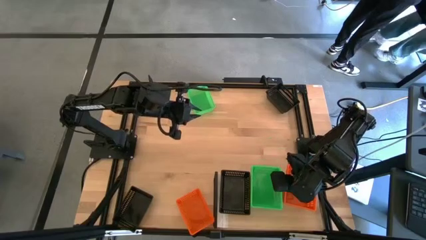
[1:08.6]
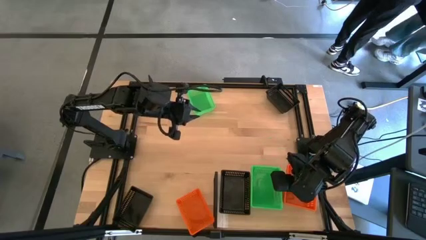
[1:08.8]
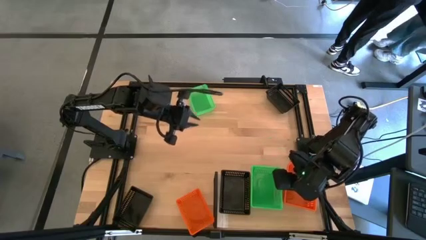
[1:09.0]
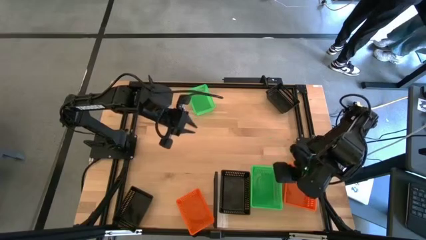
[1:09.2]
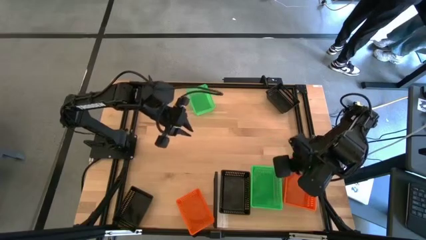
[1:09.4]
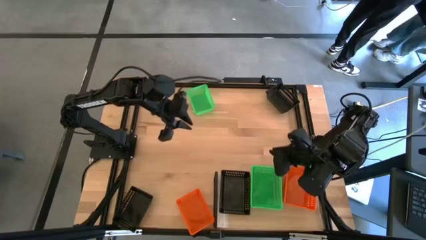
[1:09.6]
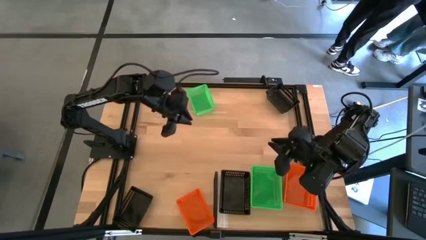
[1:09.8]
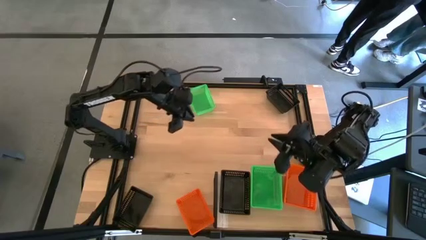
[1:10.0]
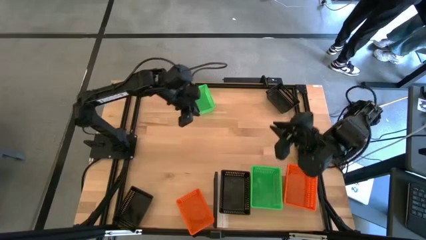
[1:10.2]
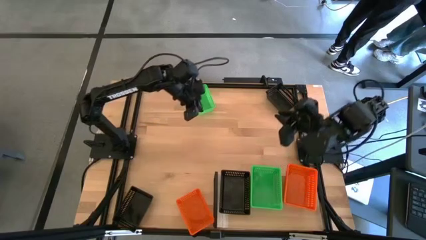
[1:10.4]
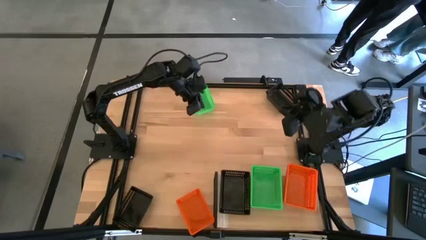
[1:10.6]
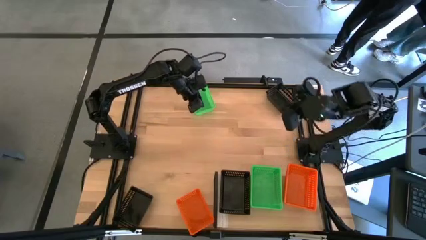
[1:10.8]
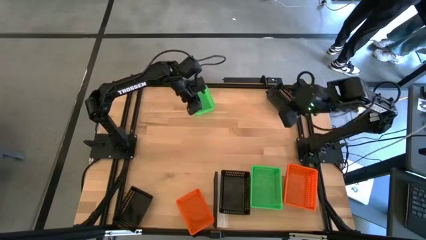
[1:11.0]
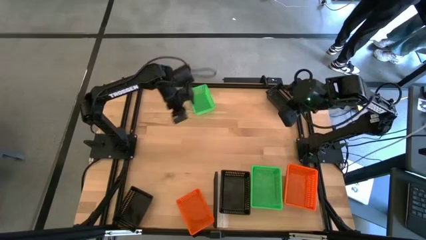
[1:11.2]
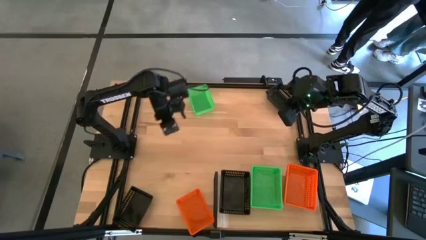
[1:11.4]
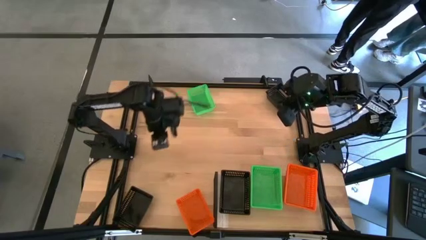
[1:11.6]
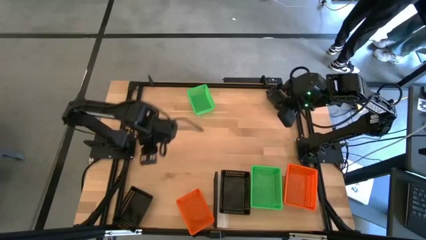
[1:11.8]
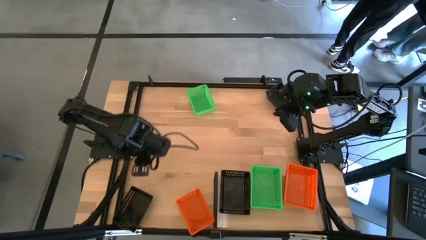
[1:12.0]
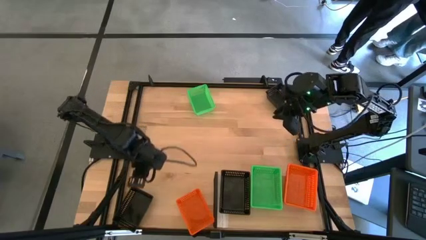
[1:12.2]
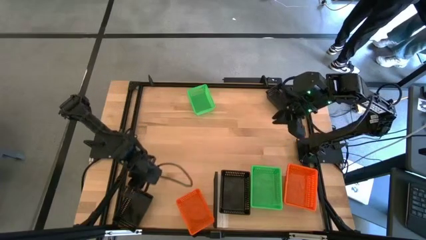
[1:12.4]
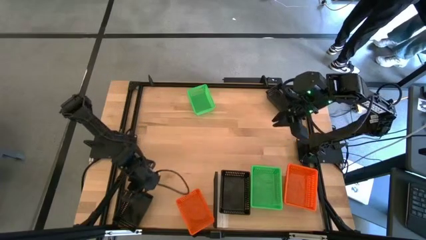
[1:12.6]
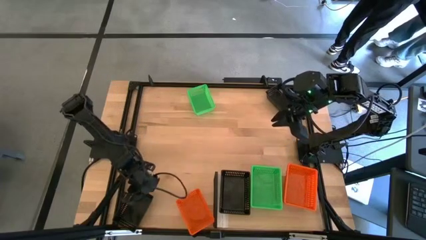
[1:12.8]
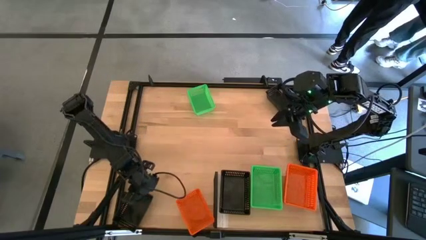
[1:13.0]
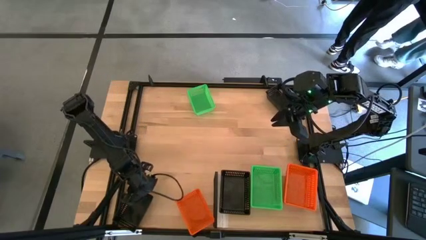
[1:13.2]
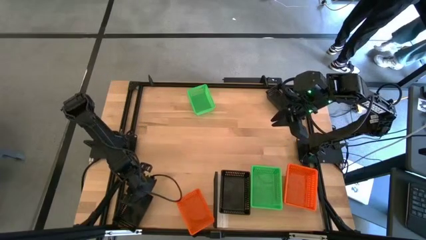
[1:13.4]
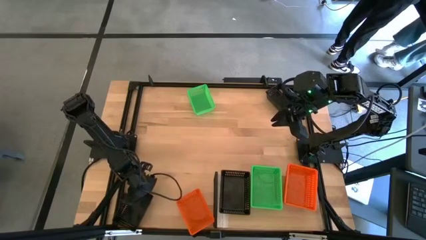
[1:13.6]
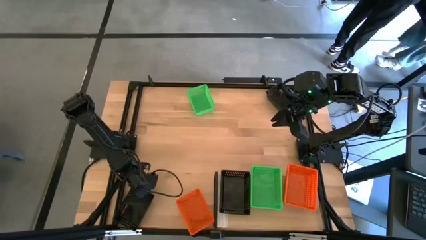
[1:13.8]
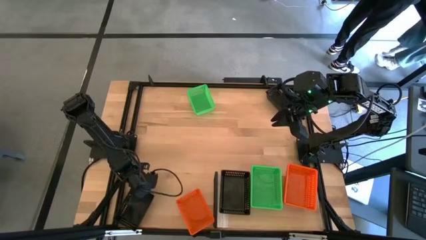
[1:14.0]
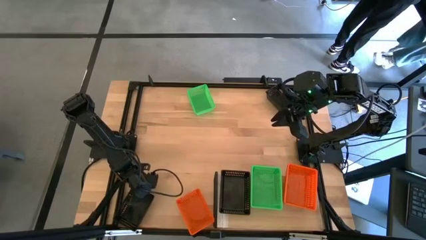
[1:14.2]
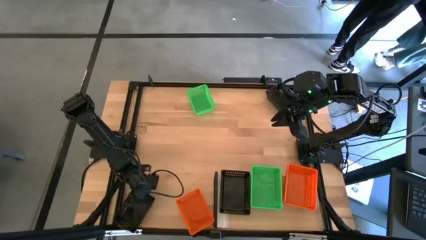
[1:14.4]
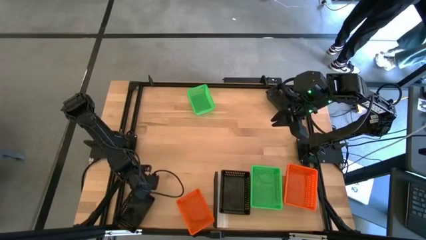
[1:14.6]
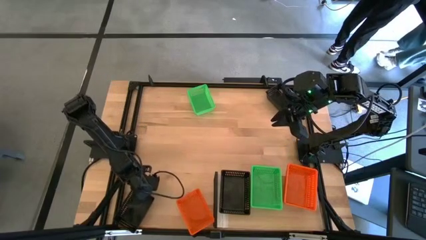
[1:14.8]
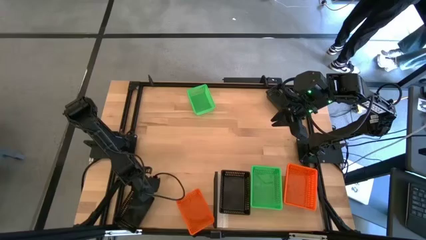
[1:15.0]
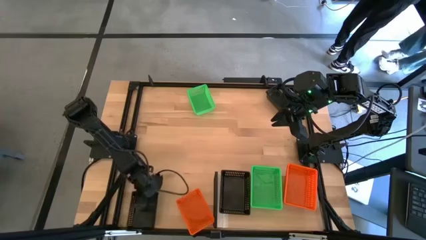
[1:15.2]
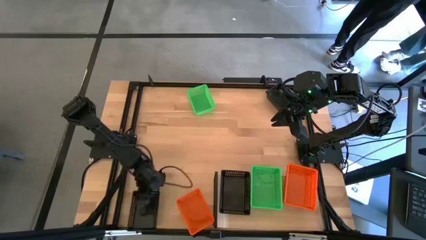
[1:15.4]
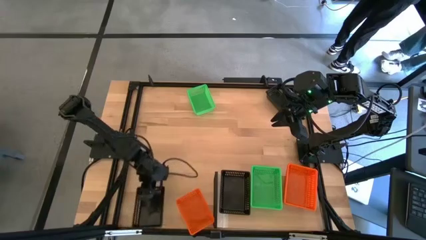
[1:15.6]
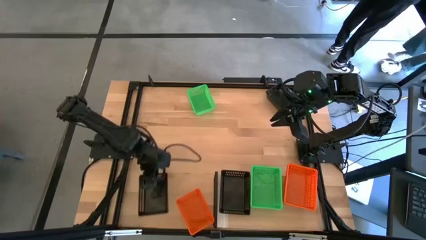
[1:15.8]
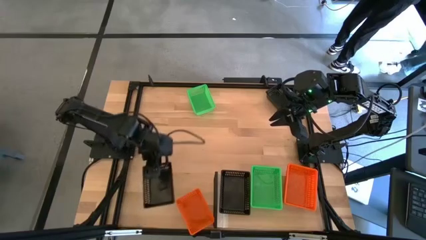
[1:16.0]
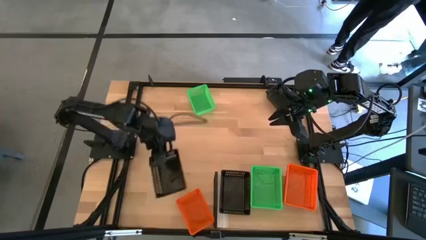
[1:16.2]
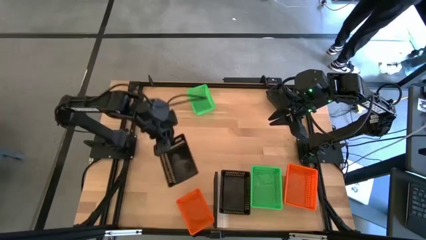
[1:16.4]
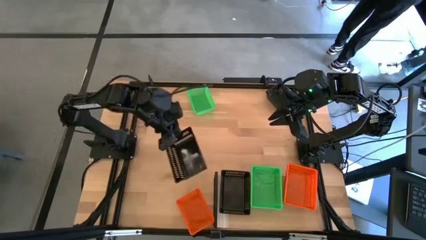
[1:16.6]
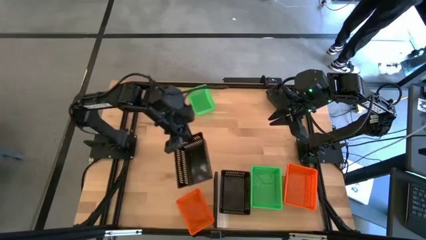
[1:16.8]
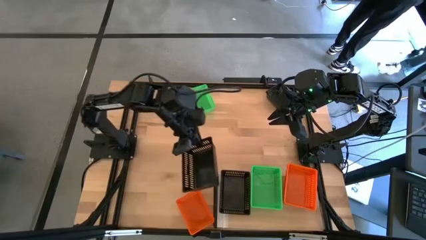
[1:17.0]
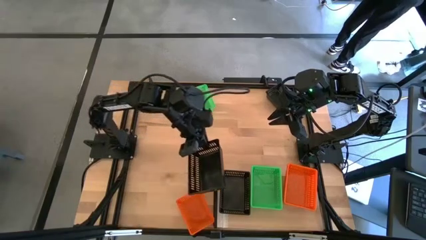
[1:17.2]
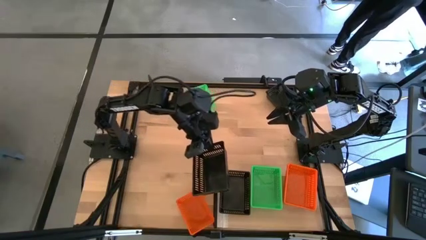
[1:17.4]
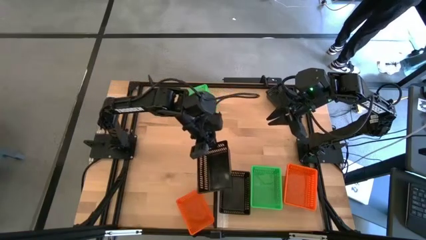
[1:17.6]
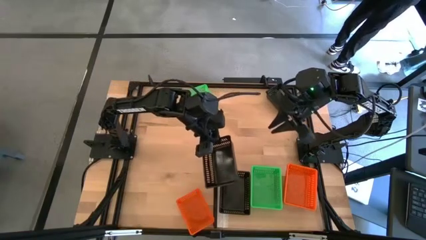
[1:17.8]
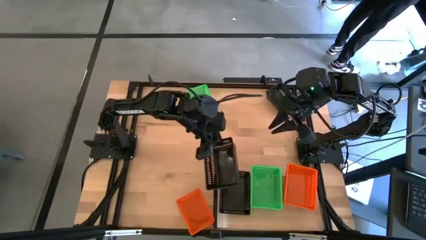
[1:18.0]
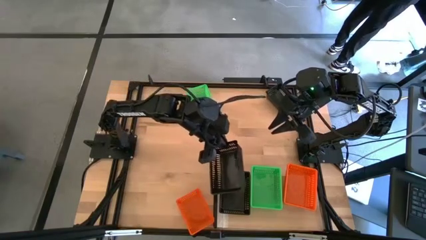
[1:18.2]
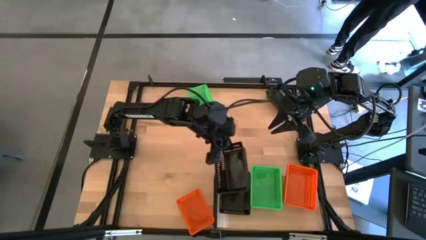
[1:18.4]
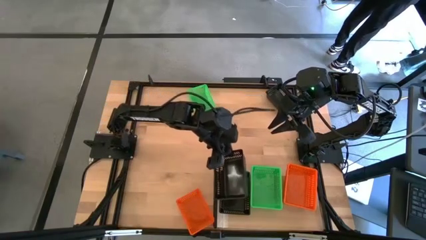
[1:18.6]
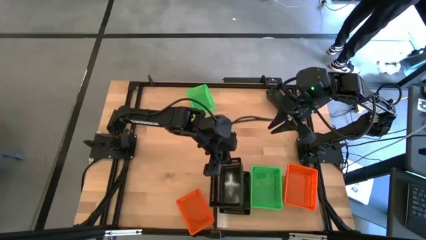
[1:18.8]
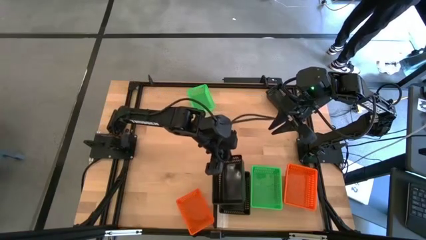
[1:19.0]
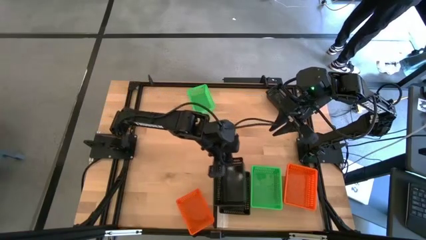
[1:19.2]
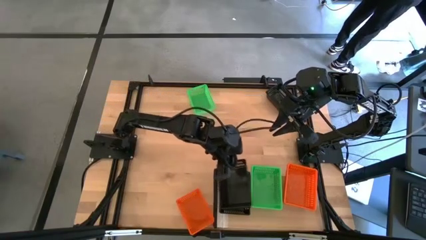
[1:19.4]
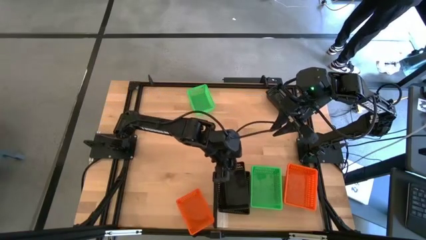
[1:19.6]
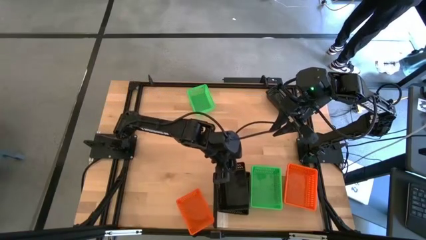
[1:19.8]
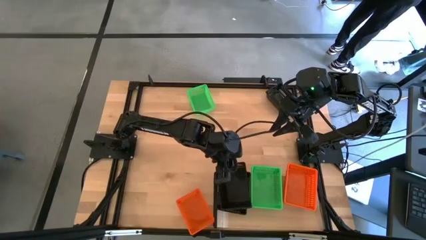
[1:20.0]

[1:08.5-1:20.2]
Task: Stack baskets on shelf by color
Stack the bottom black bin on the black bin on the shelf

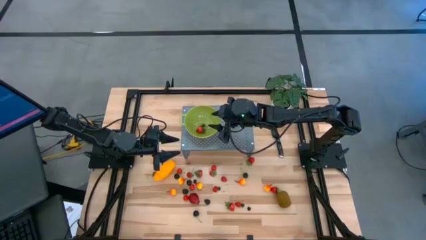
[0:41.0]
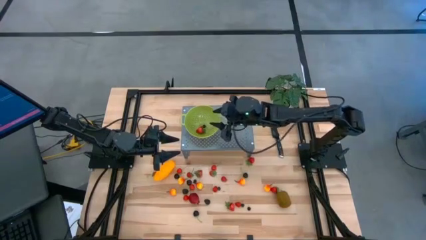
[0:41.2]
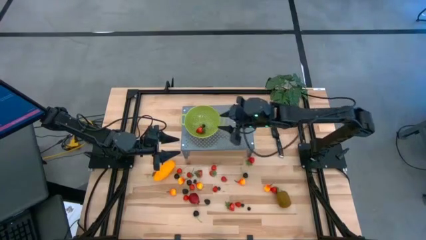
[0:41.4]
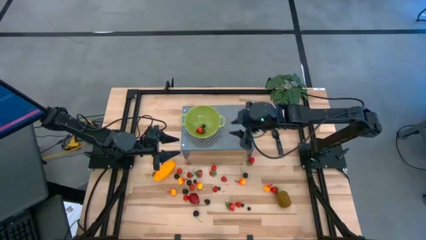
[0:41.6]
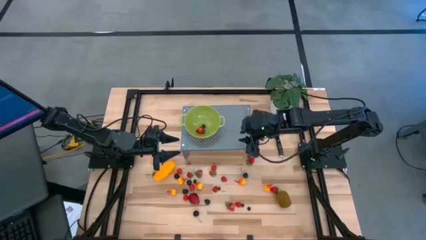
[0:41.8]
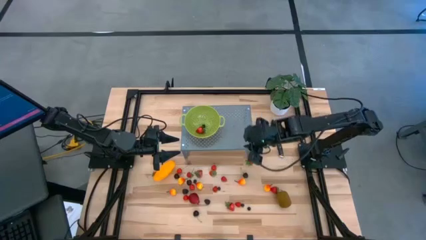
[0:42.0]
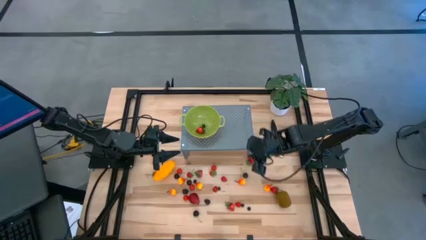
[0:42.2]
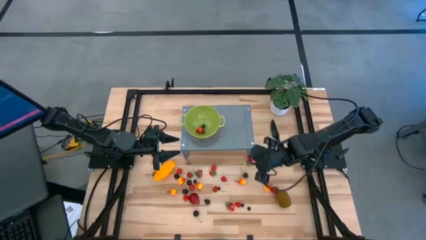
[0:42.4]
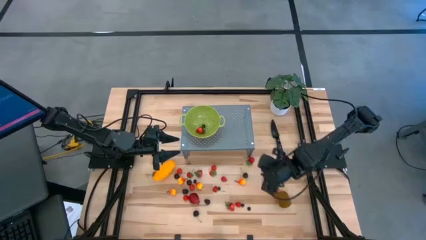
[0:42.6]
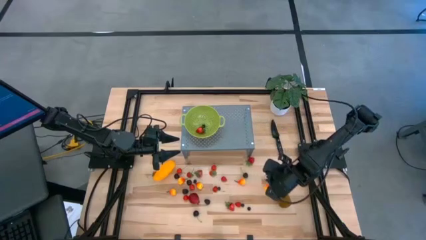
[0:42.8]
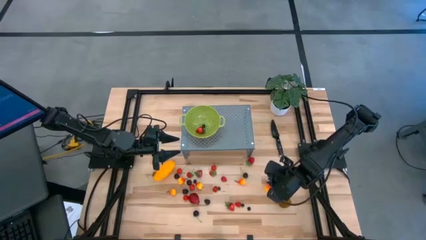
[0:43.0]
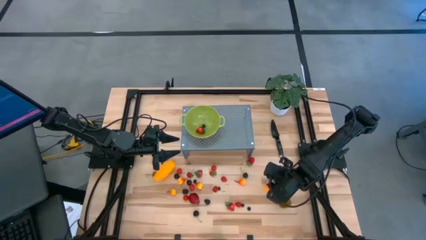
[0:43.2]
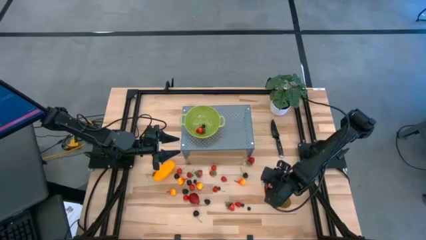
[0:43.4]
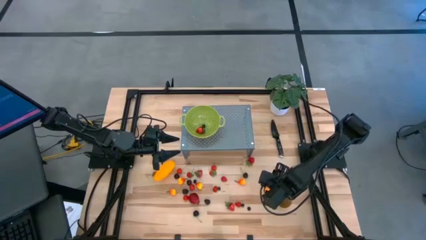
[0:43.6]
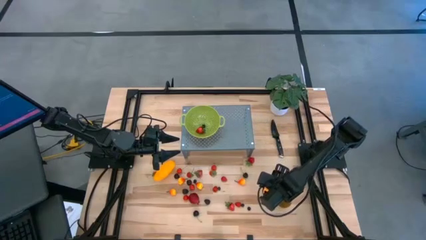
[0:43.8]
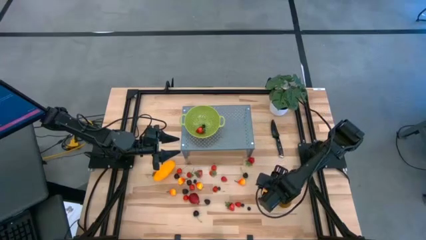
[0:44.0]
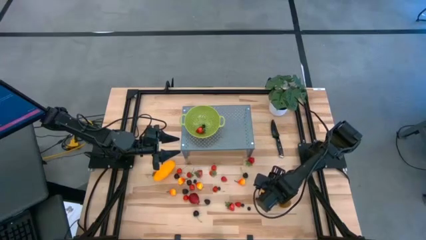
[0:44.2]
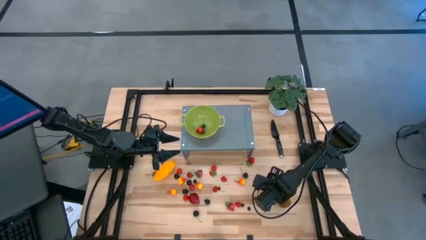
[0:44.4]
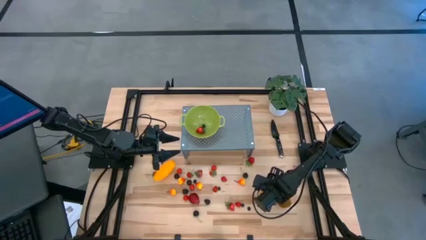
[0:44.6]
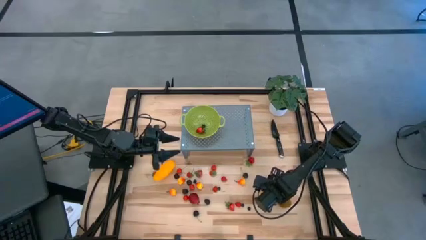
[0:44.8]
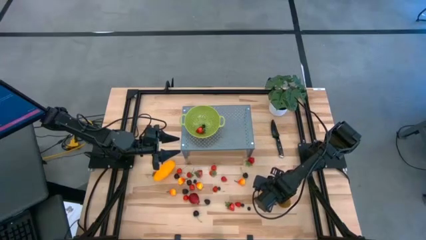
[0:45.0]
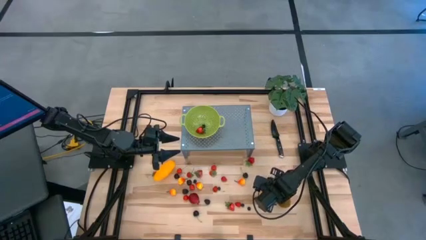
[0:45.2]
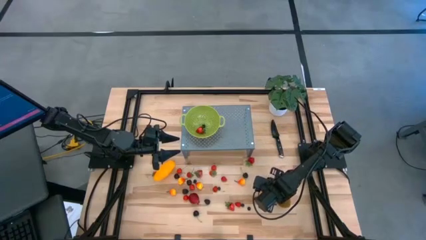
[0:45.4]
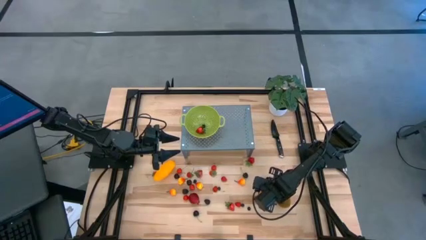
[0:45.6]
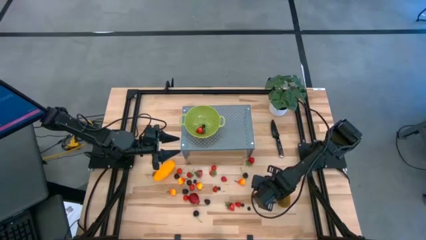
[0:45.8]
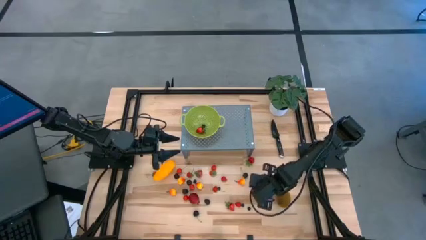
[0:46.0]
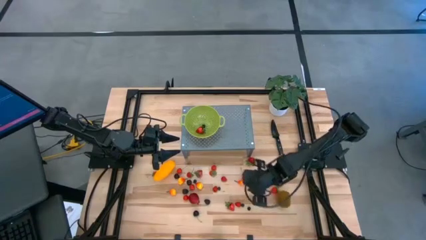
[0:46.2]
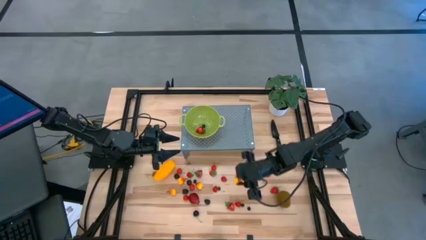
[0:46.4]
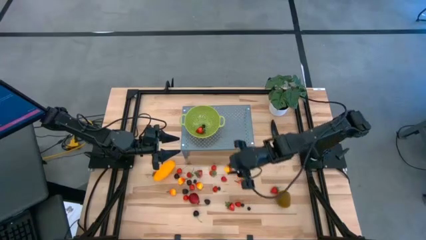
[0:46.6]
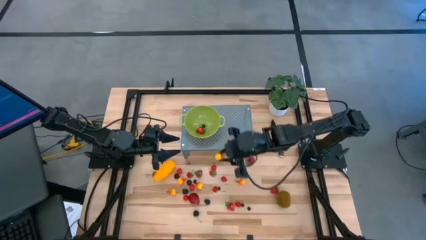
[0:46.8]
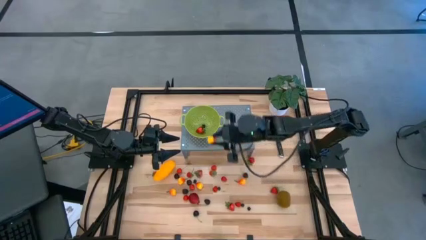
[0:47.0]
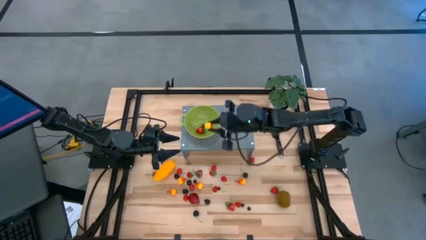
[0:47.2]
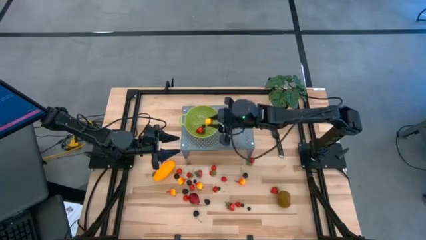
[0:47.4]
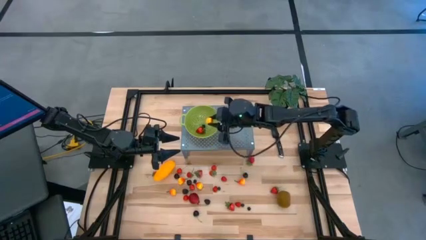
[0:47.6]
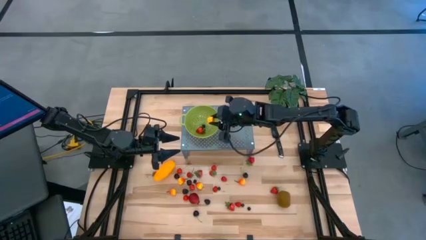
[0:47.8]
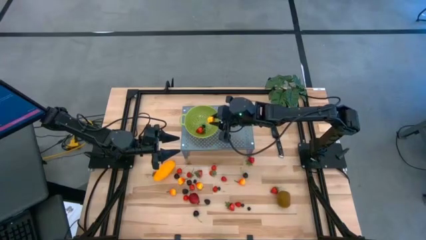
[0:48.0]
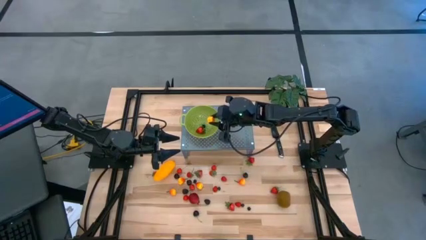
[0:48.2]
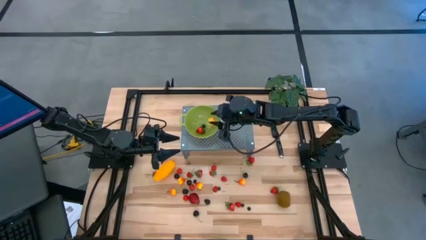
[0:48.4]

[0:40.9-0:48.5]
Task: Pick & Place Fruit
Put the peach into the green strainer bowl on the shelf
